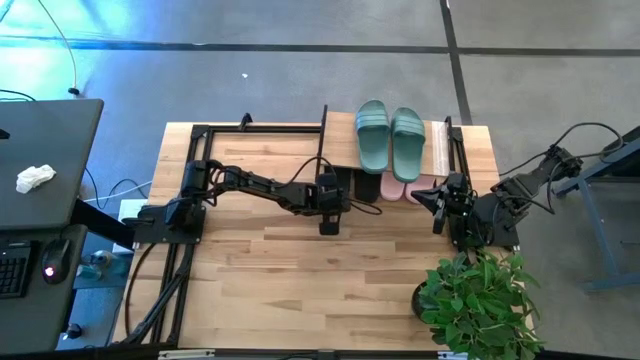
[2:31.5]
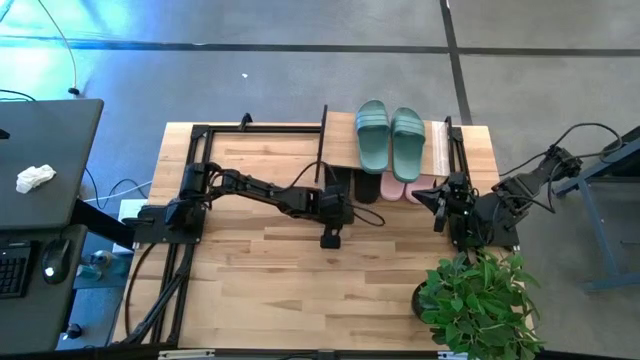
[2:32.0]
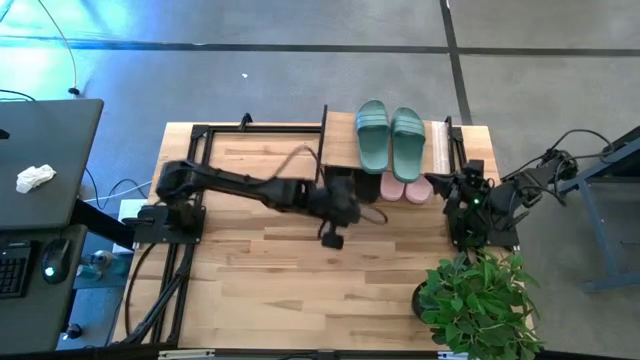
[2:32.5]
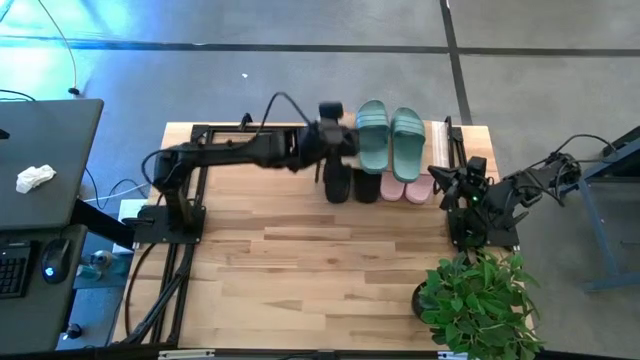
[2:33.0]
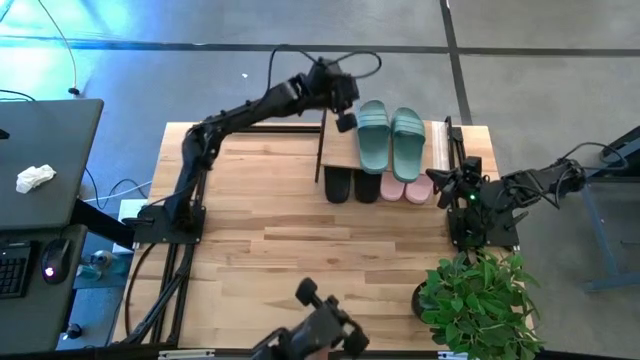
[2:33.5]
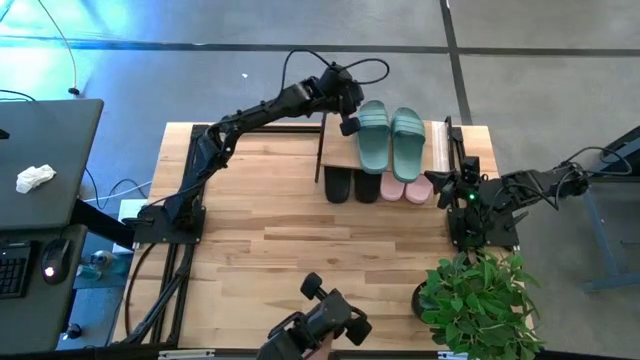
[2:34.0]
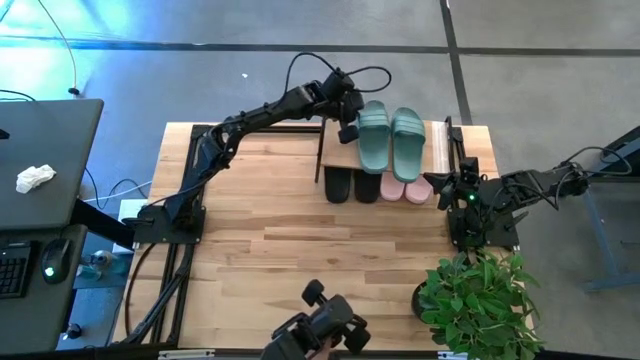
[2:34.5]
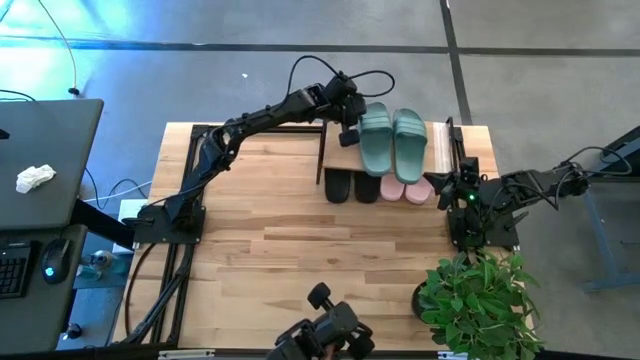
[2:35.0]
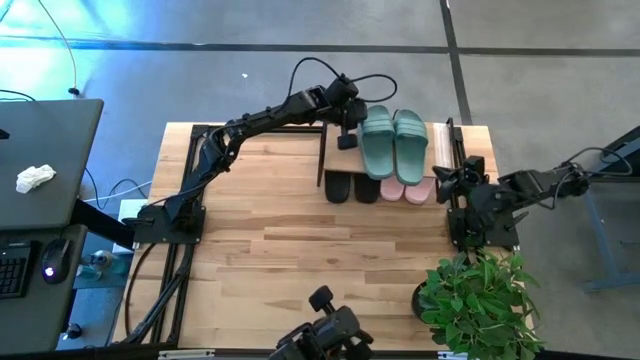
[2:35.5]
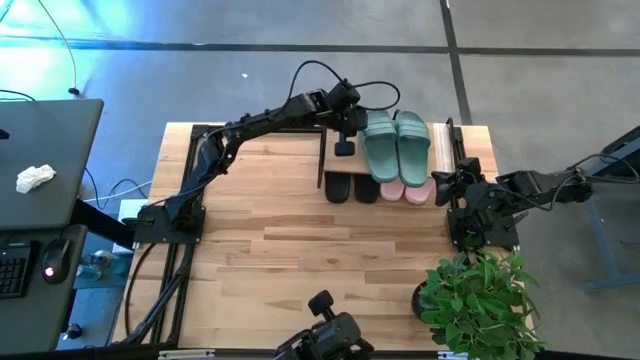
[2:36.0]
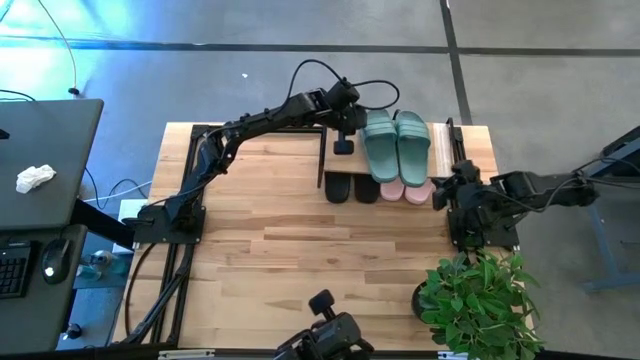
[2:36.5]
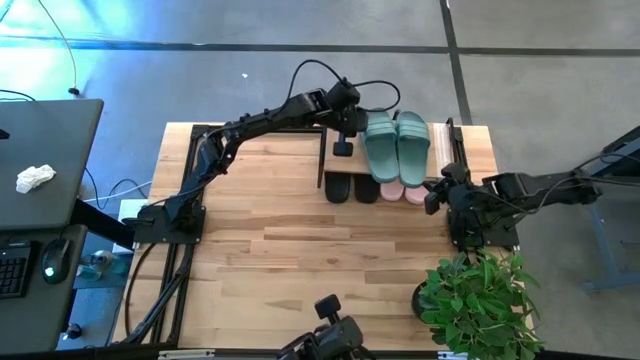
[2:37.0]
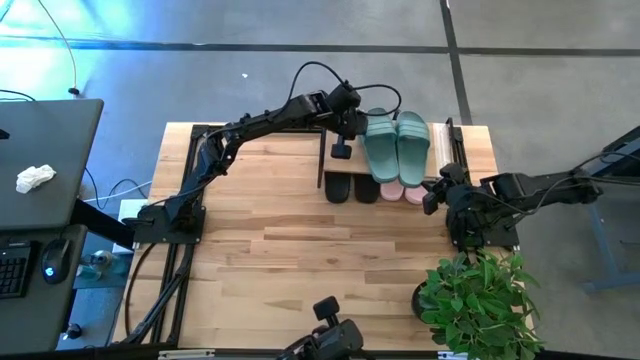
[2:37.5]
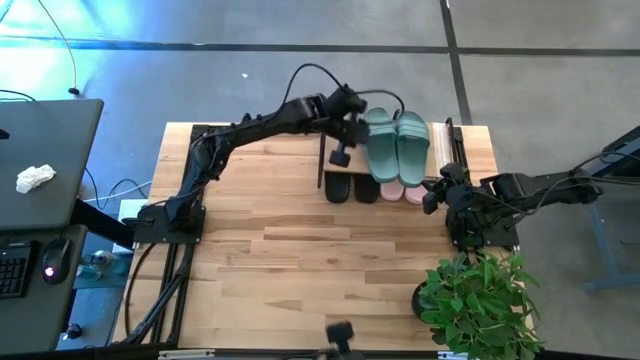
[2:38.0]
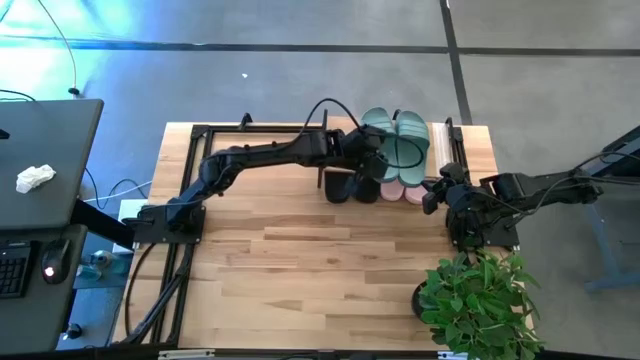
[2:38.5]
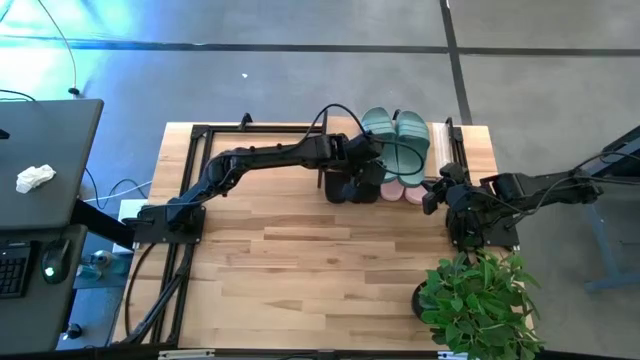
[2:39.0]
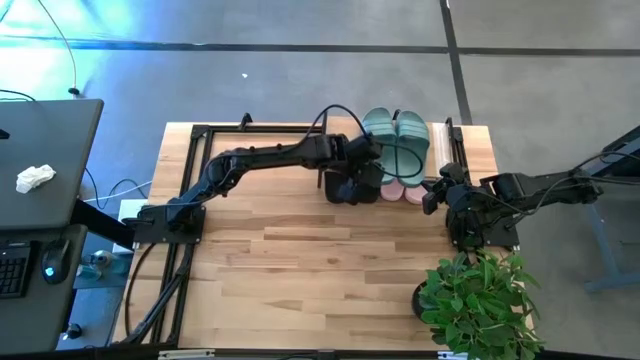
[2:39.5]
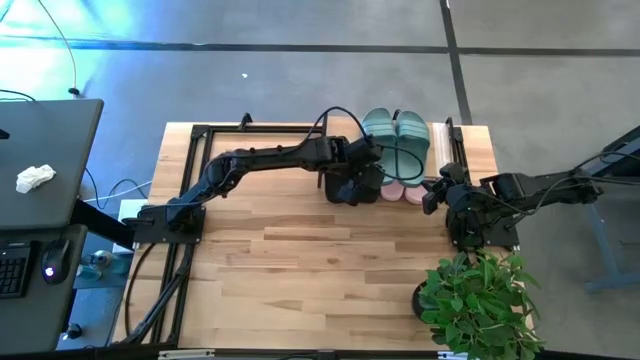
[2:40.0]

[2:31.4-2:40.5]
Task: Pick and place slides into the shelf
Adjust the blue slides on the shelf

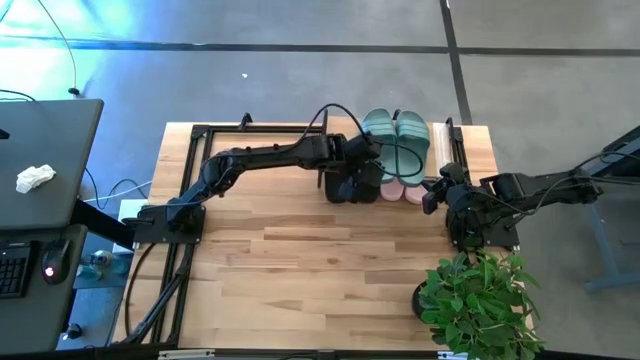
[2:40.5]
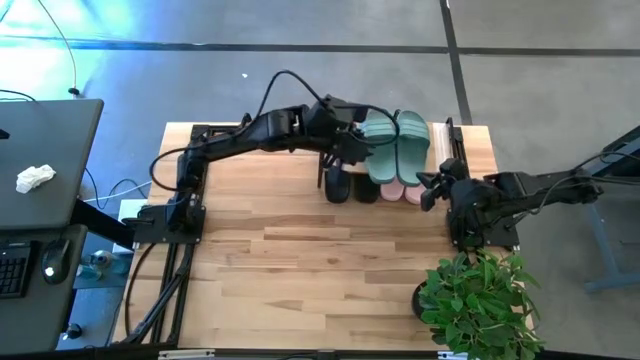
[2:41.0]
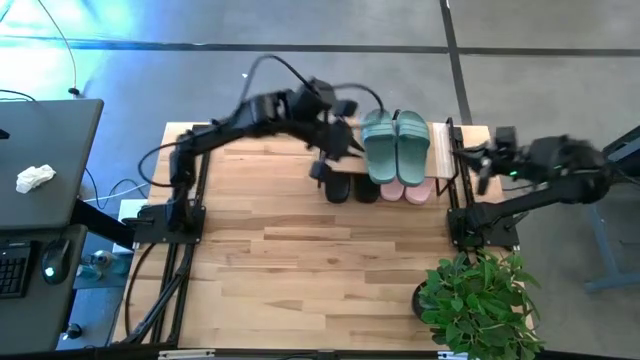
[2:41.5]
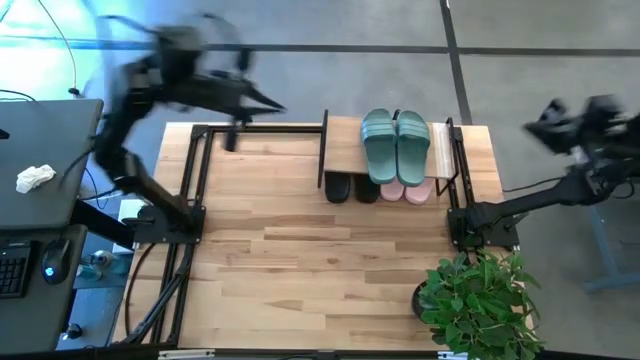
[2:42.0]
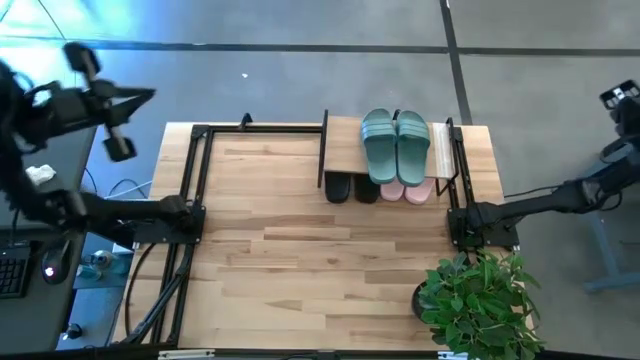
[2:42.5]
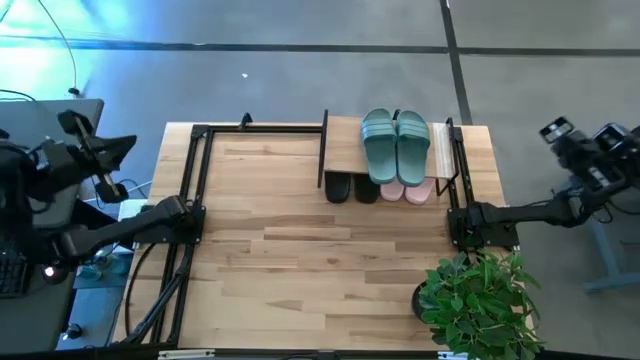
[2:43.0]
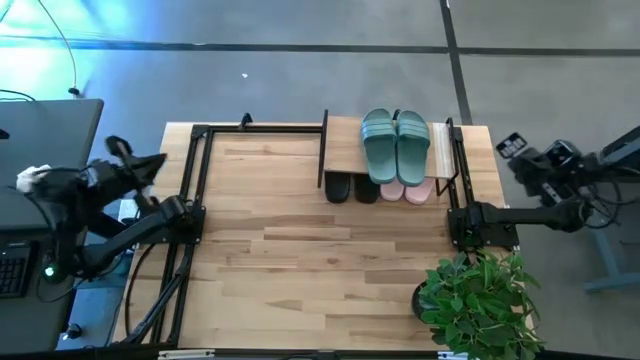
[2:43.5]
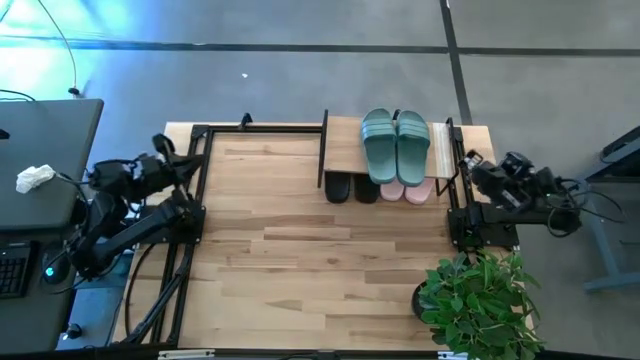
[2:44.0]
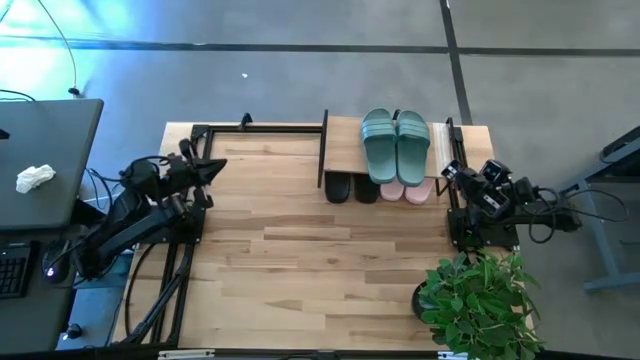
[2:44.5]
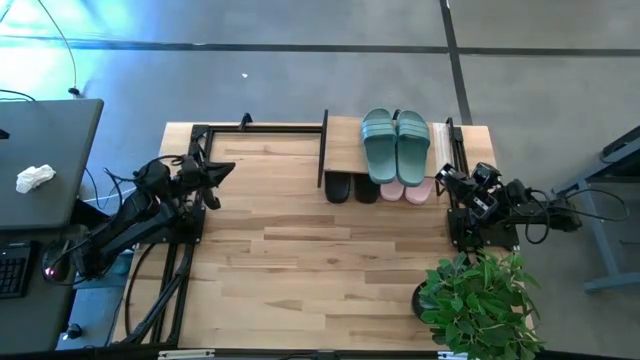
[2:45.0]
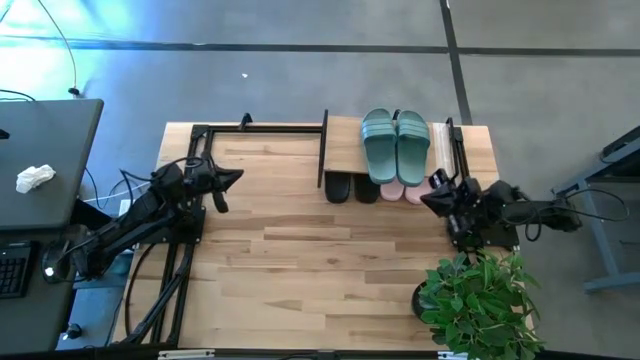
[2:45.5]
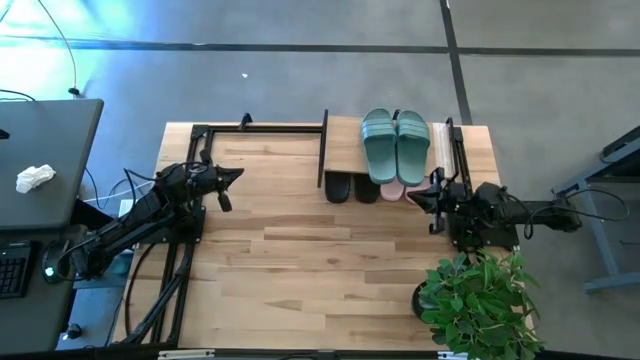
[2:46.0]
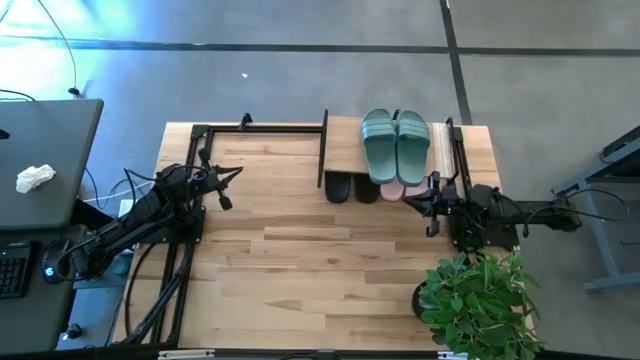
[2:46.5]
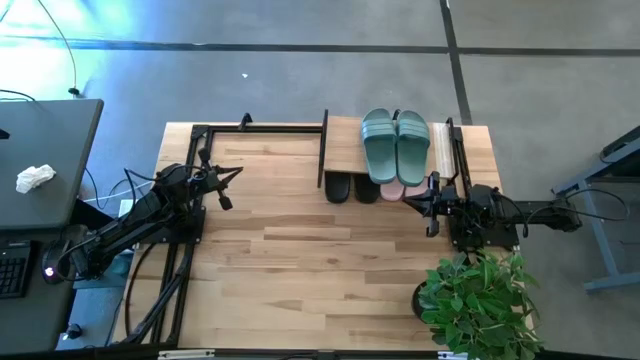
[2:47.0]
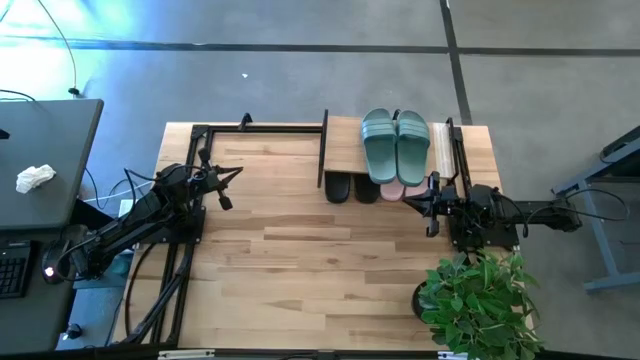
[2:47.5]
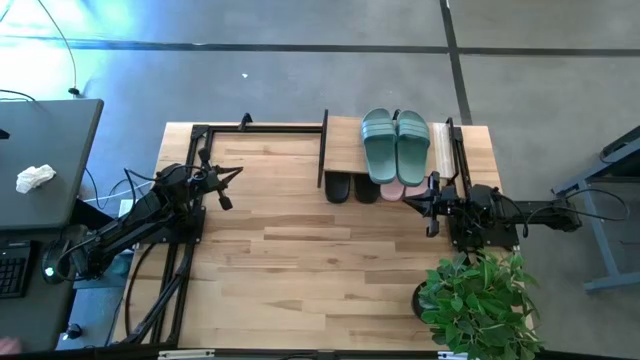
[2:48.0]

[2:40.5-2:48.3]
Return to Home Position

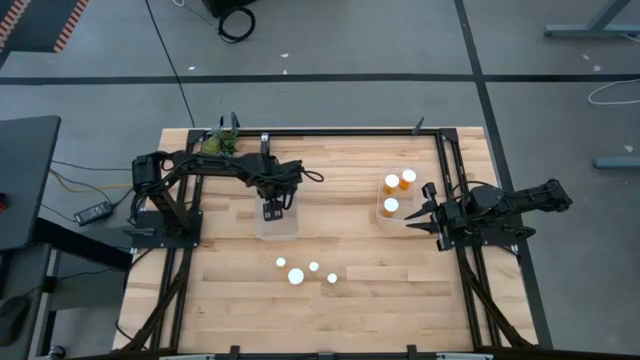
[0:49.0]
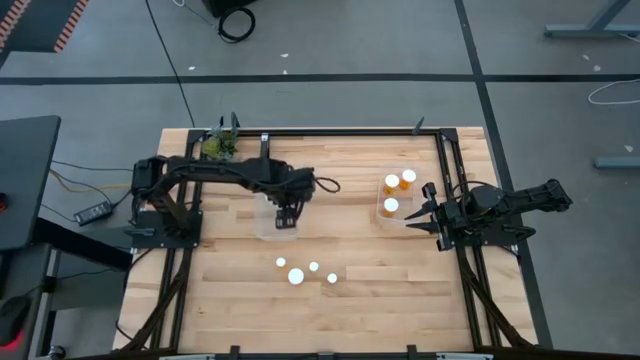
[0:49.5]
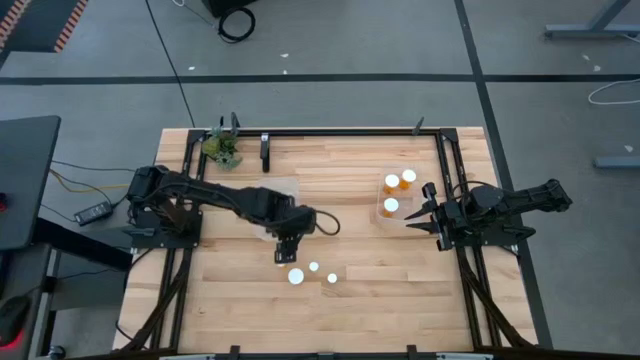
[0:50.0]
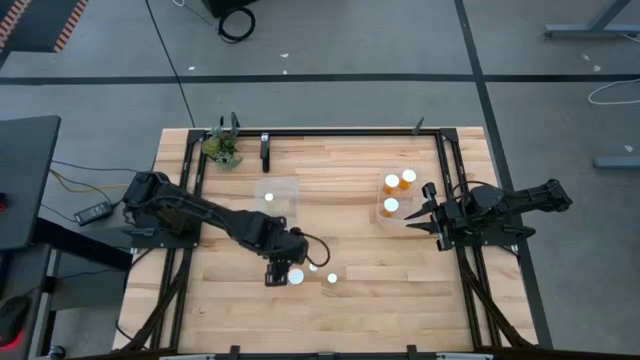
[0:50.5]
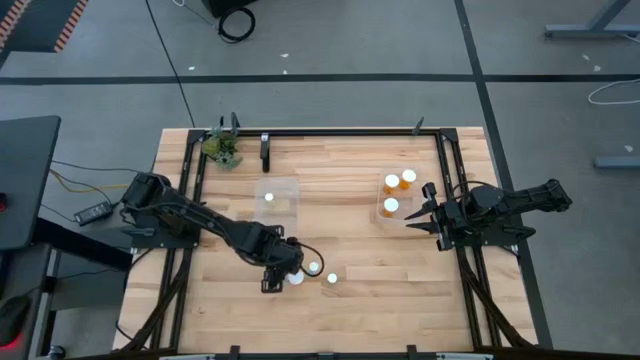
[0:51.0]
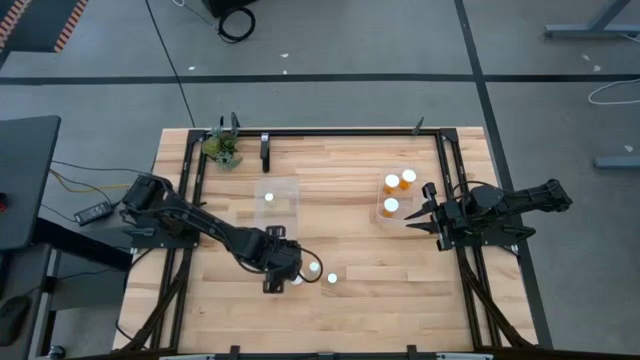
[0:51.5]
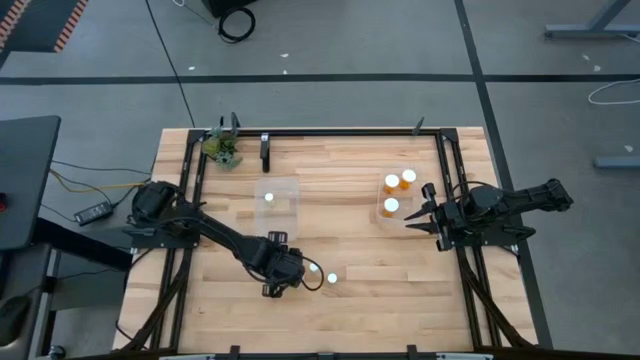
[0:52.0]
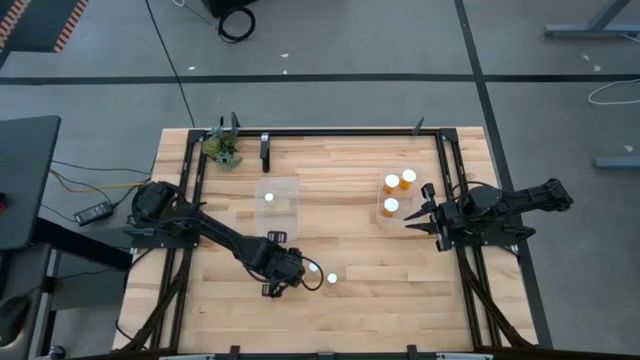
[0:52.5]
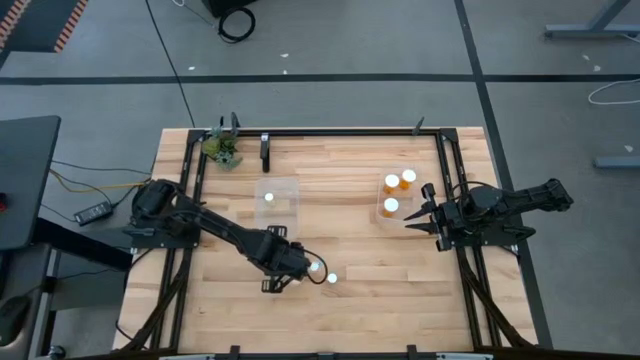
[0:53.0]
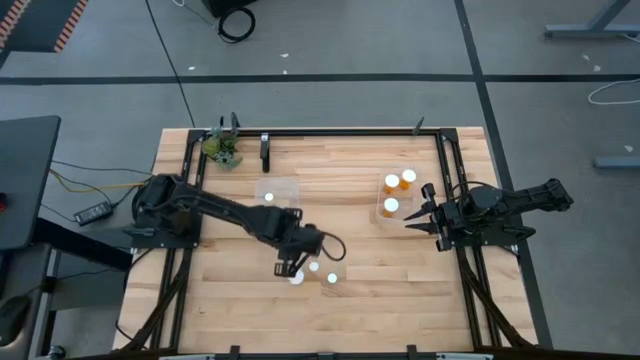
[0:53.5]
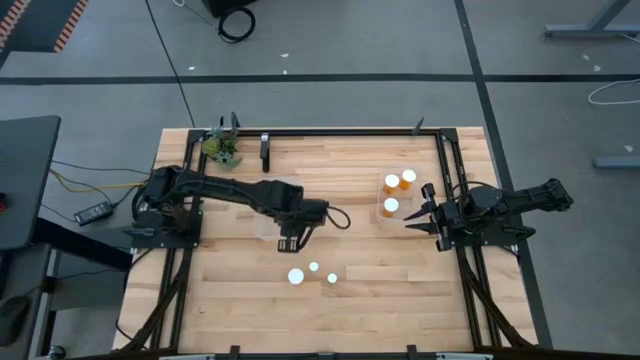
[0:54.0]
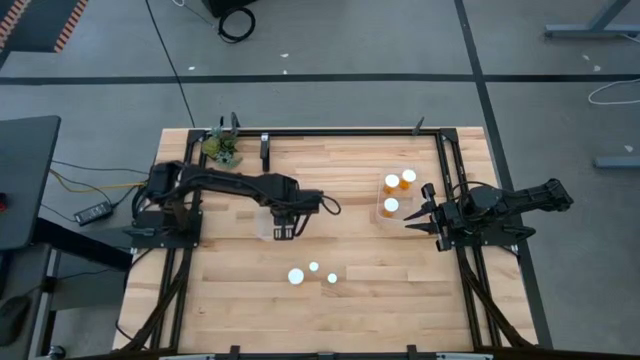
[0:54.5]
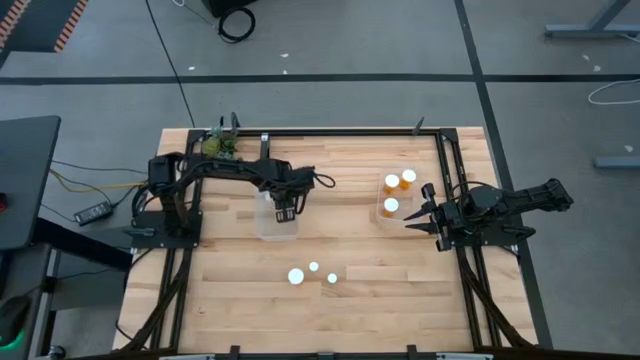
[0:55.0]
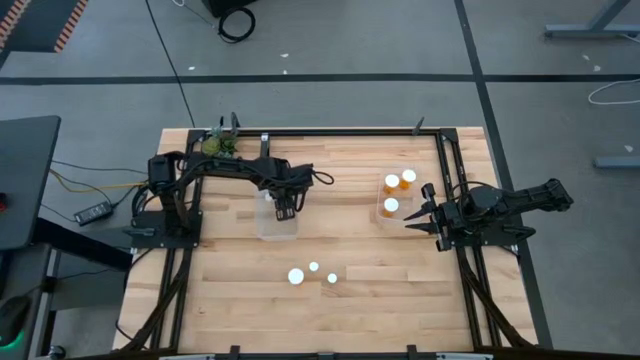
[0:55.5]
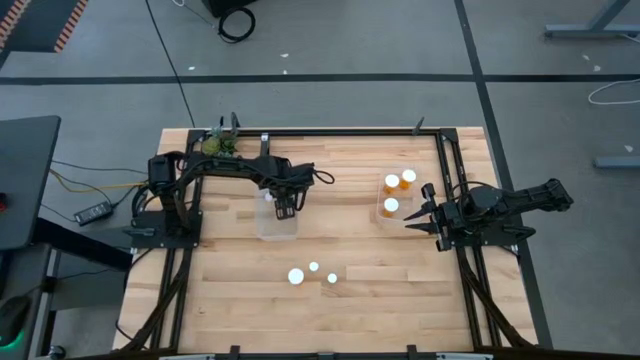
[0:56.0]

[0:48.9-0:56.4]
Task: Pick and place medicine bottles into bin by pill shape (circle, oval)
Put the small orange pill bottle into the left transparent bin
